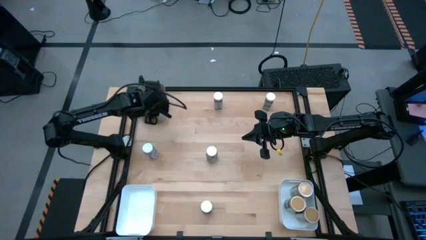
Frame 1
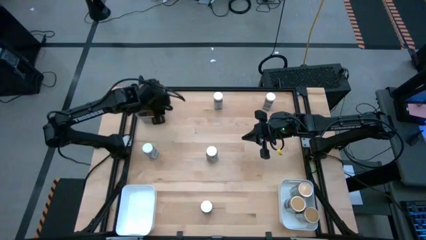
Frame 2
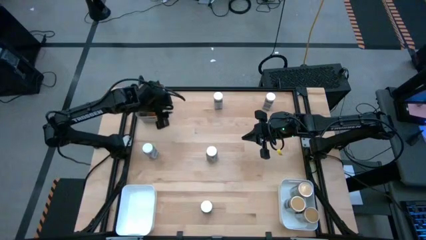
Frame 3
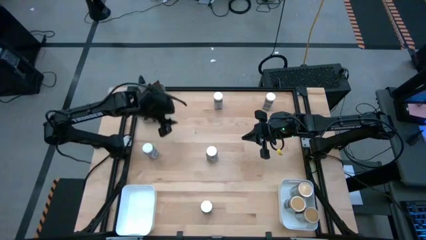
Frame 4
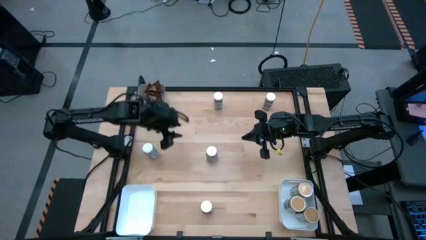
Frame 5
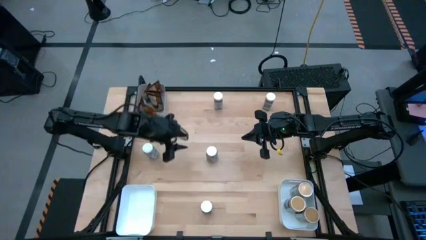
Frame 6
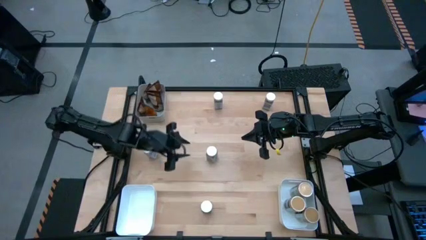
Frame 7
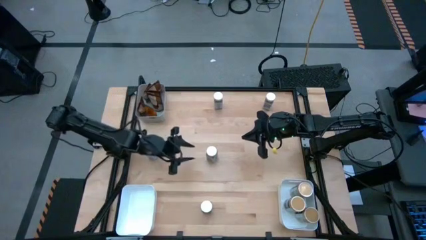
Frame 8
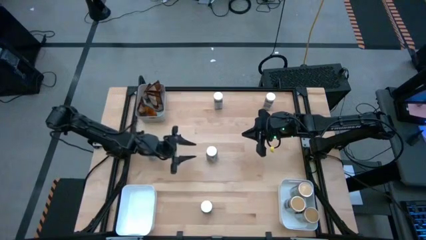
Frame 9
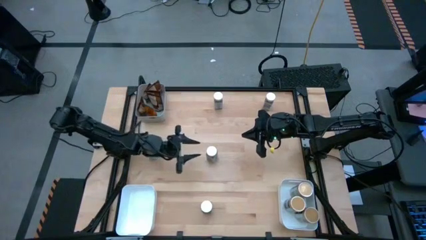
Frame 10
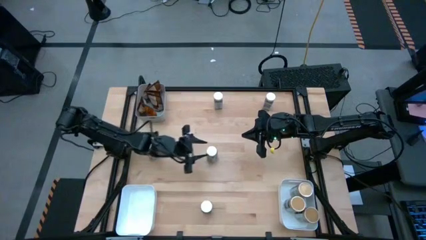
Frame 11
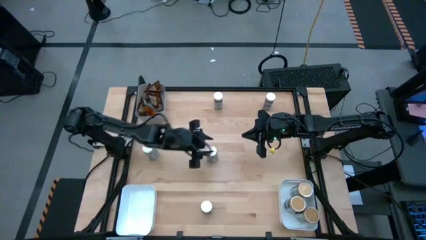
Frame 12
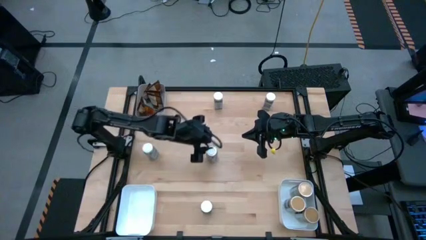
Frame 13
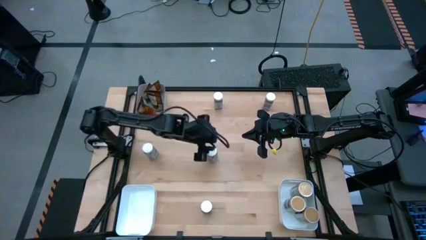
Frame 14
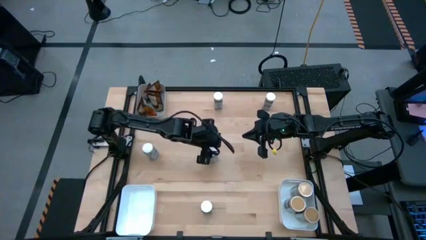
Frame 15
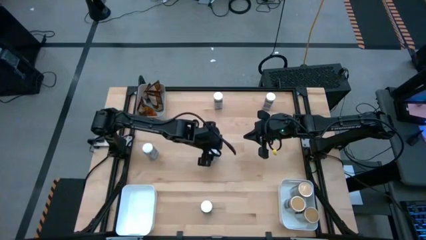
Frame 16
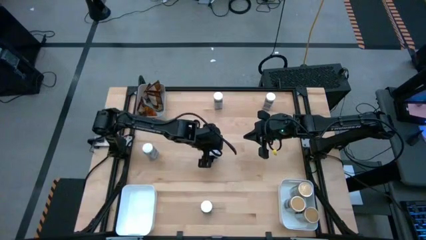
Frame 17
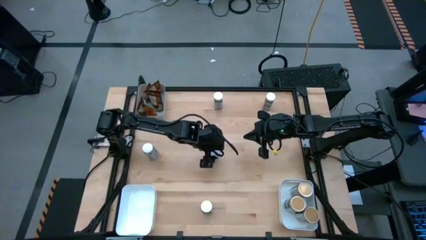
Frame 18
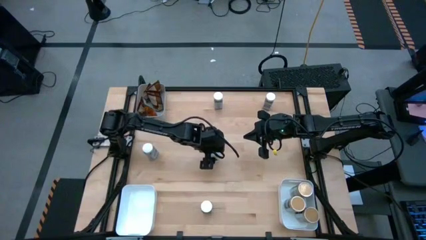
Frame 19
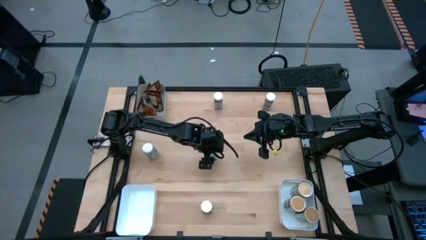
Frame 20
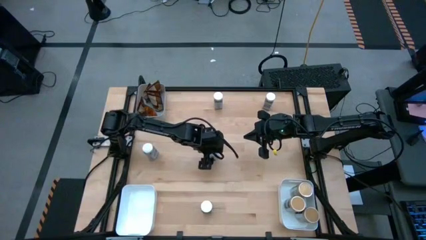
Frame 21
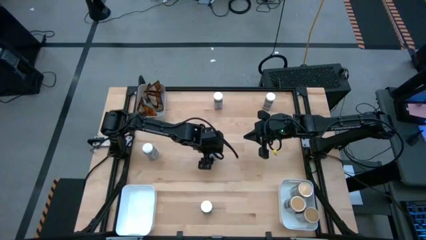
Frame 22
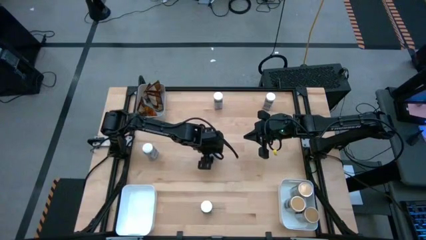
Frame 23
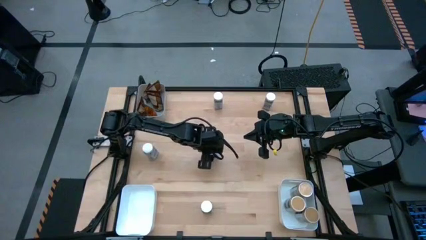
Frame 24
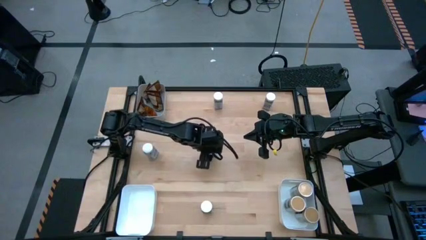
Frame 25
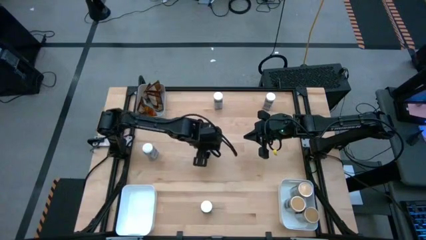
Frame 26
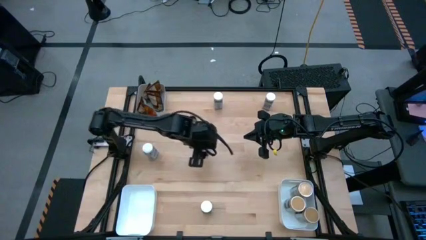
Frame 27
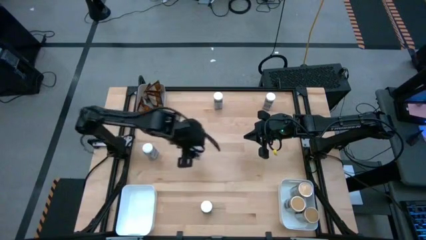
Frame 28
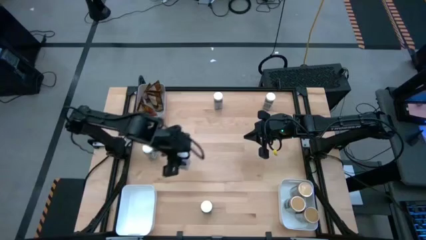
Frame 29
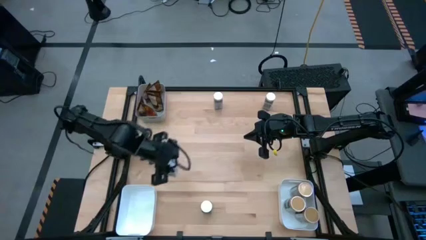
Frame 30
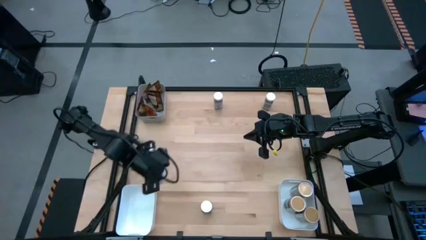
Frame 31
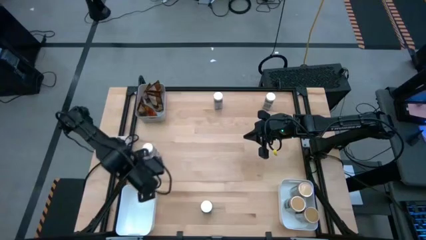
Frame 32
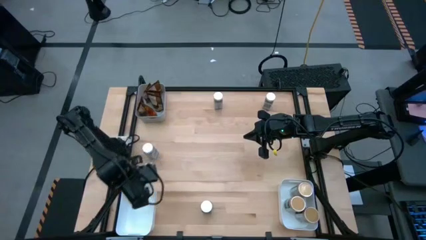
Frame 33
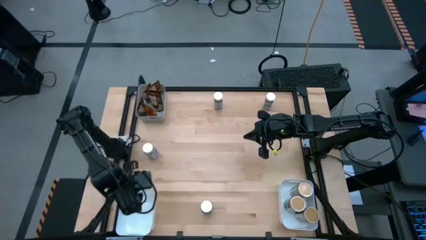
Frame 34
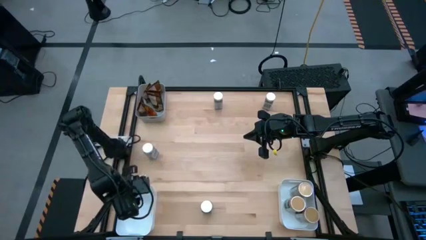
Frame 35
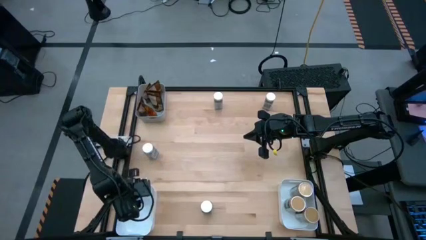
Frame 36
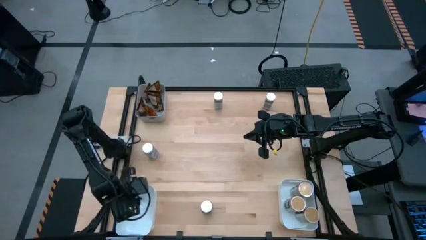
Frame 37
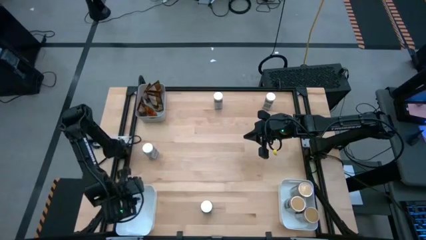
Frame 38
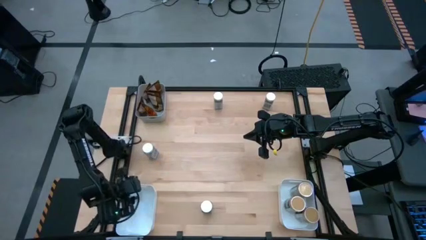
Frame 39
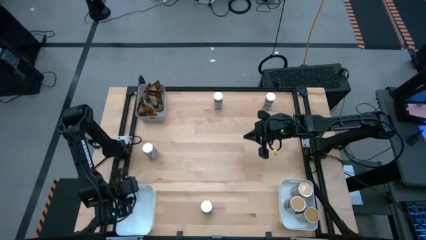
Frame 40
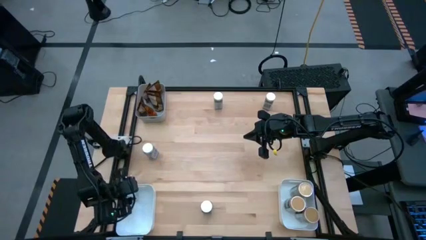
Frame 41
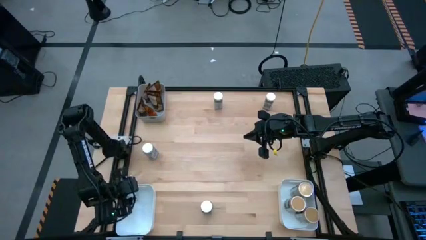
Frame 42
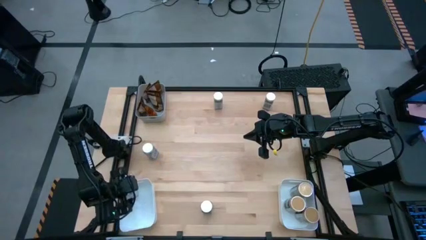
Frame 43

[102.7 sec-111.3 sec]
Task: Sort spices by type
Put the white seasoning bottle into the bottom left white bin

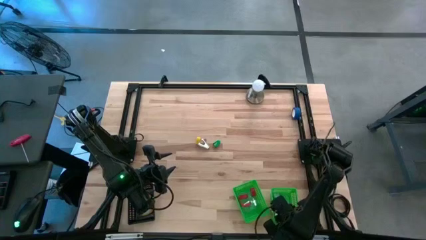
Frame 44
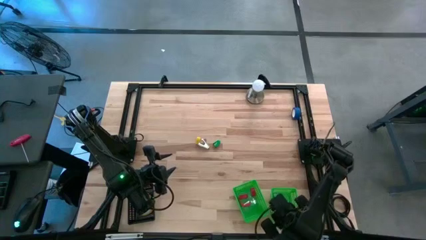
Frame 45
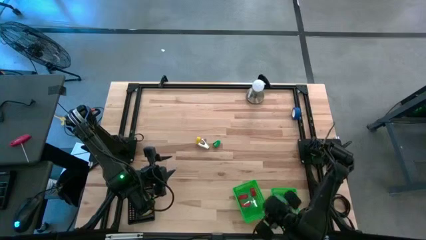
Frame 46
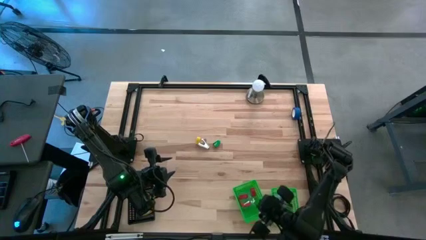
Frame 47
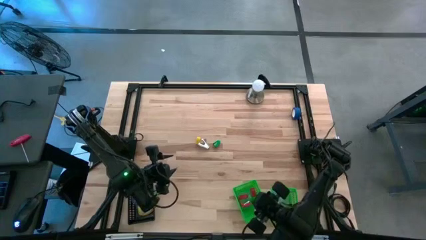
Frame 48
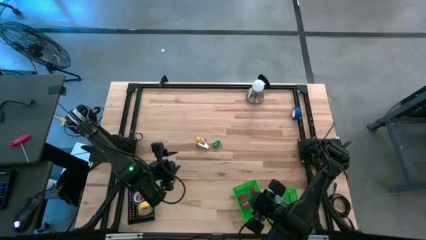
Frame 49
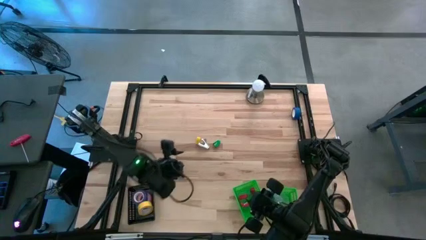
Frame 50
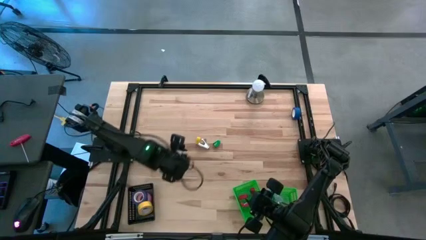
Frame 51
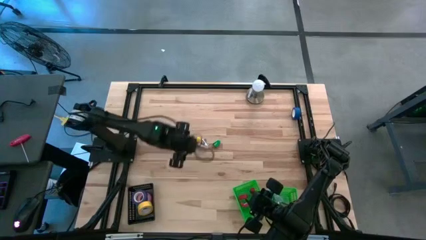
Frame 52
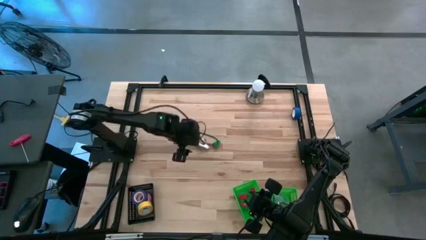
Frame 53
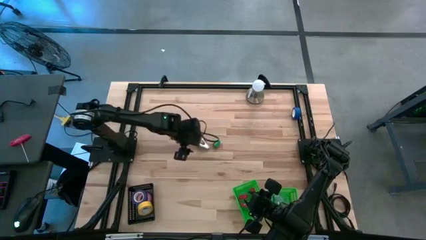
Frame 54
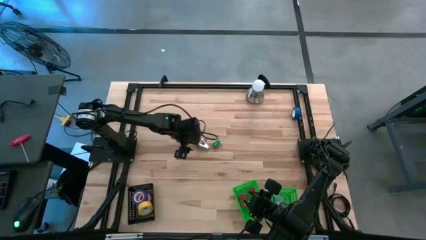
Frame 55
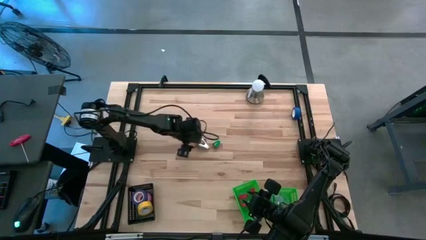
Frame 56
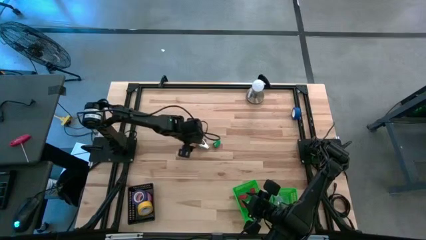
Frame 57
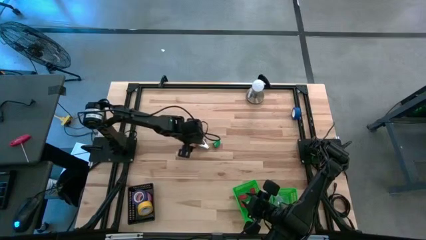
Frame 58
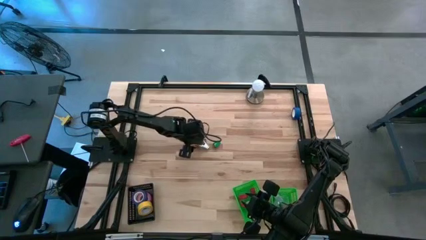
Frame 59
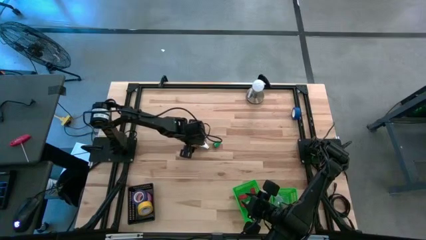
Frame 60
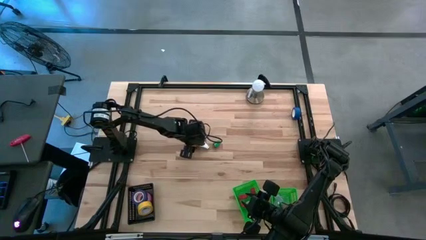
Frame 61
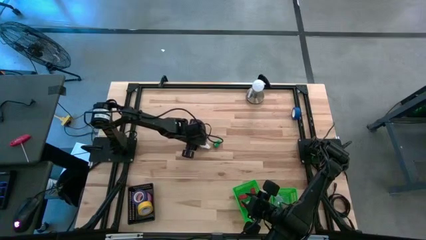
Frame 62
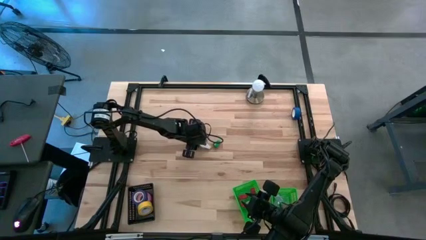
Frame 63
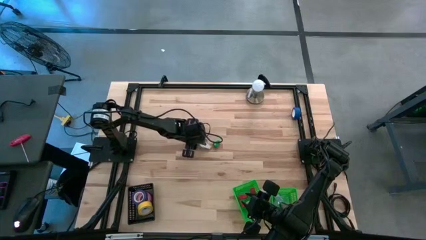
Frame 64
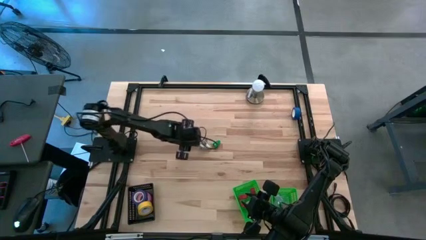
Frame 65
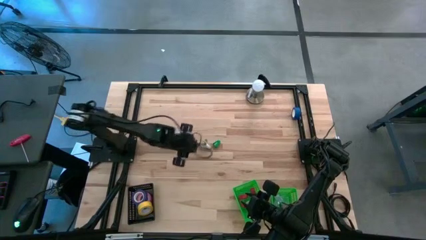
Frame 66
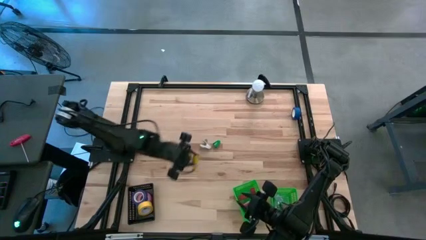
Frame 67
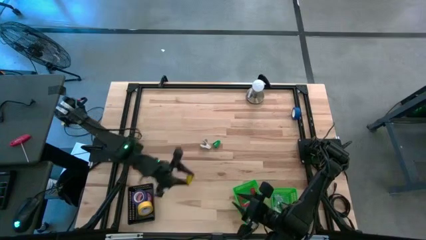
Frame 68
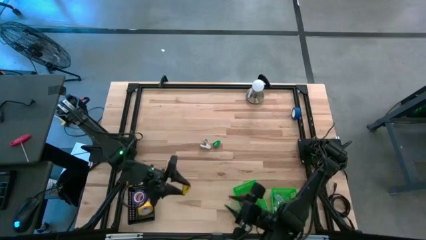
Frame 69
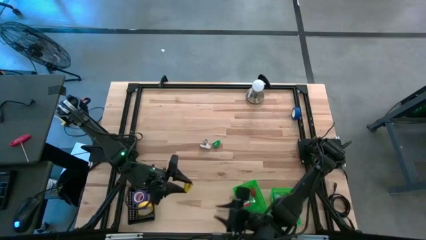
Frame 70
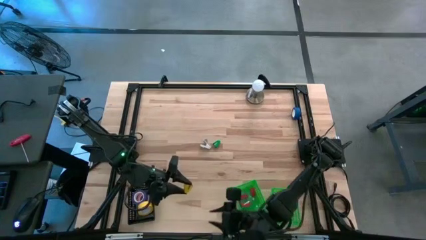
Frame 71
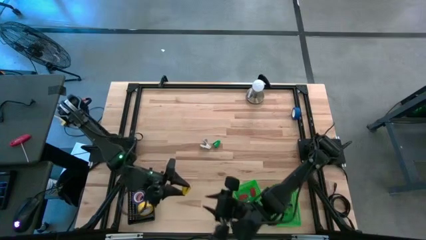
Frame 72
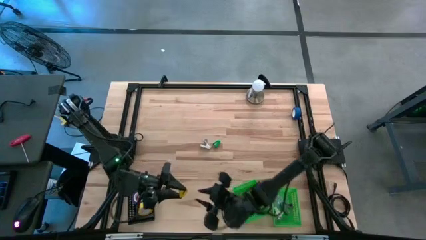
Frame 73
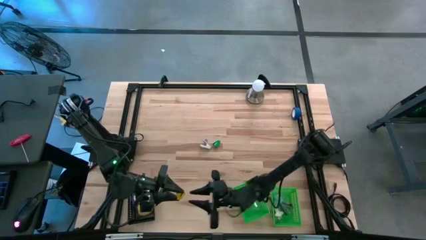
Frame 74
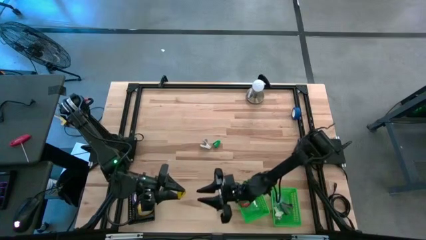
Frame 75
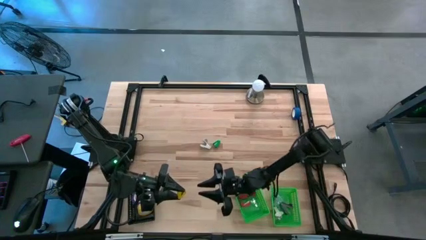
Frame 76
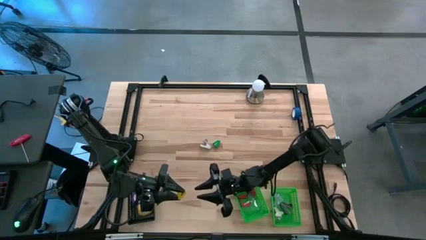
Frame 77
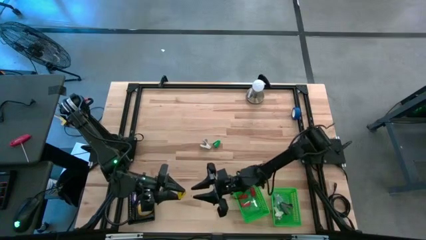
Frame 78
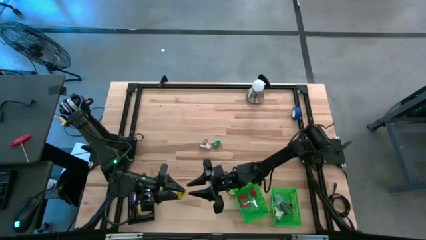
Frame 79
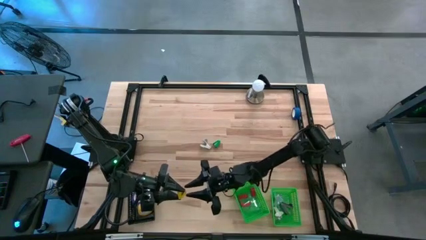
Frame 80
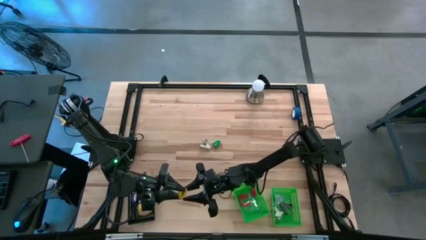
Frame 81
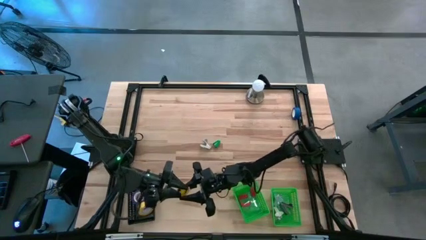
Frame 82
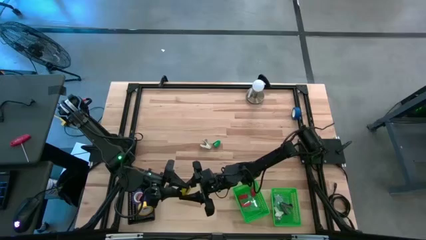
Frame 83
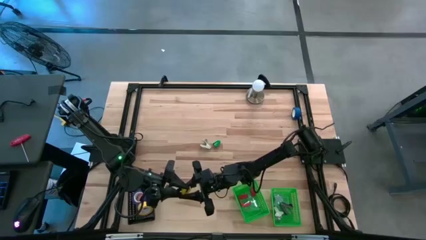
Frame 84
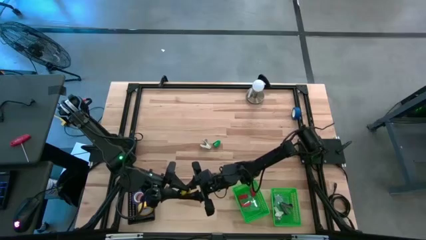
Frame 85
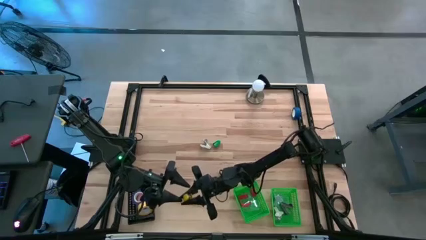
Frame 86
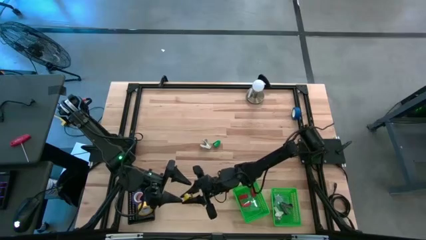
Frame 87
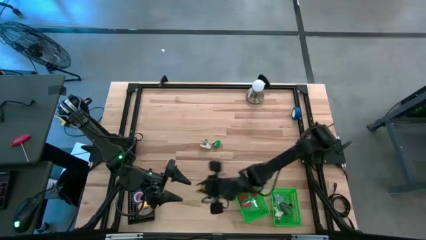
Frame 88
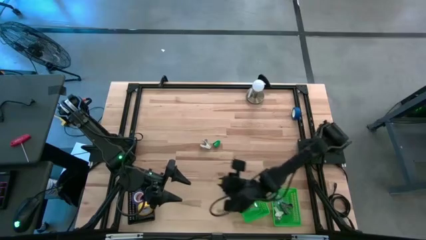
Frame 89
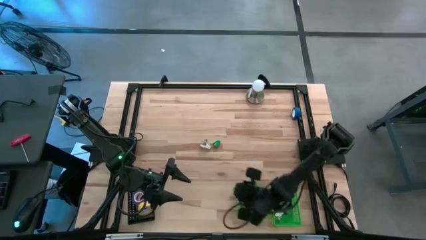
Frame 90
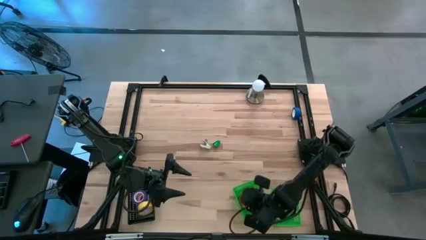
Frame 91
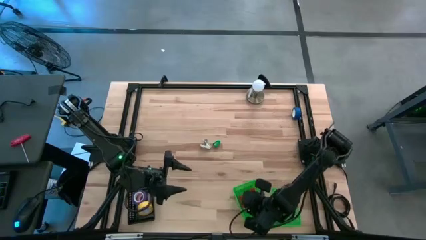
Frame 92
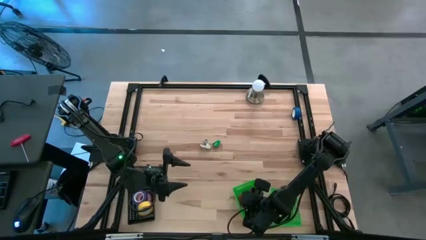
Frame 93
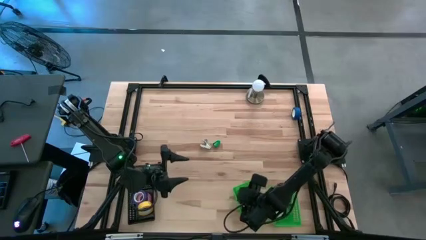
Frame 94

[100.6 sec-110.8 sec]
Task: Pick and place Stapler, Stapler remover, tape
Put the yellow stapler into the left green bin
